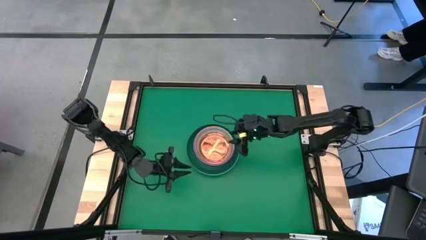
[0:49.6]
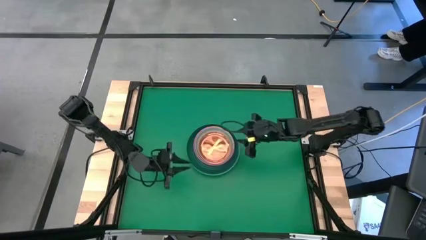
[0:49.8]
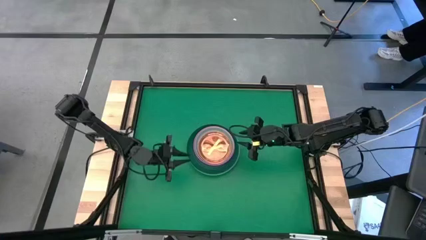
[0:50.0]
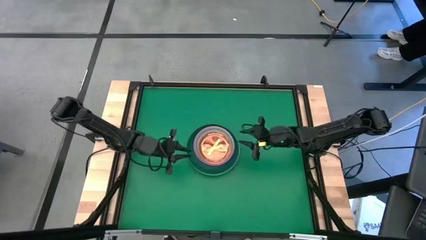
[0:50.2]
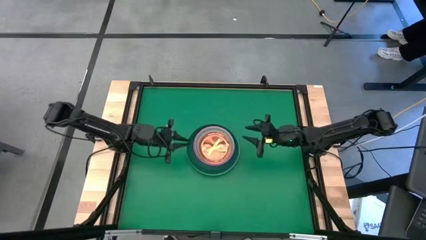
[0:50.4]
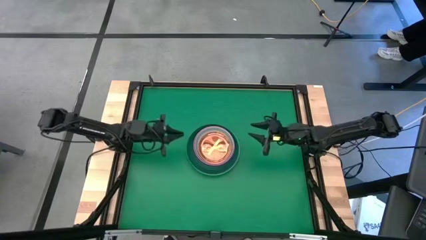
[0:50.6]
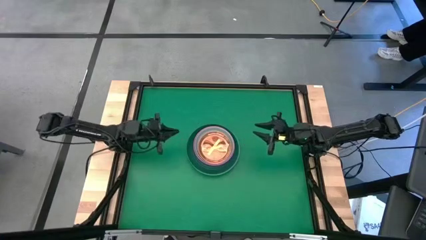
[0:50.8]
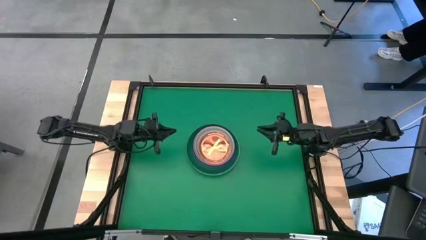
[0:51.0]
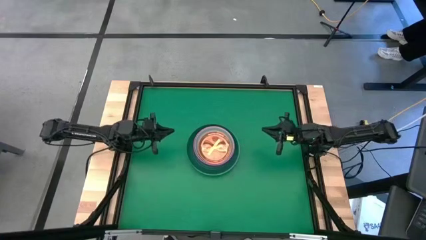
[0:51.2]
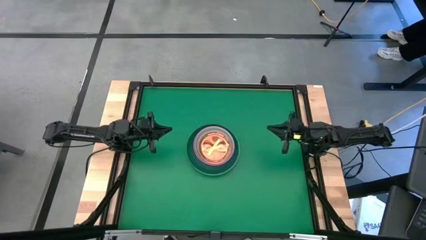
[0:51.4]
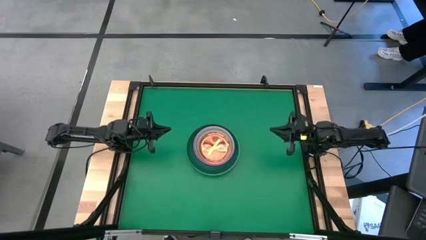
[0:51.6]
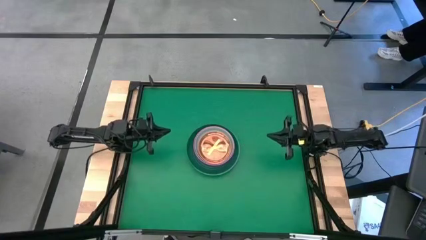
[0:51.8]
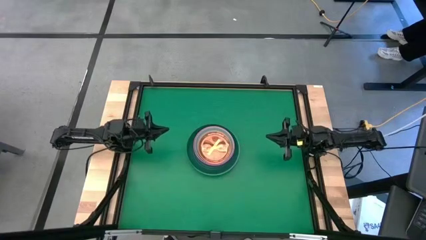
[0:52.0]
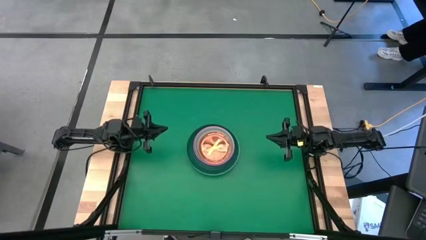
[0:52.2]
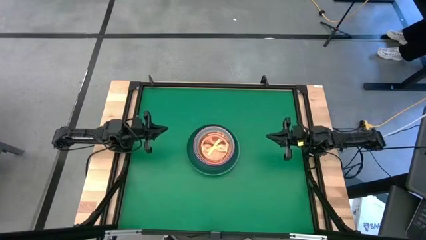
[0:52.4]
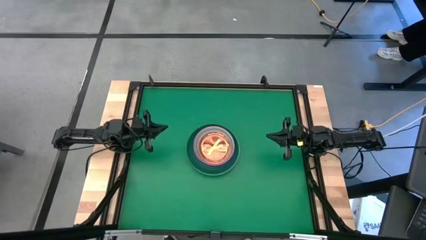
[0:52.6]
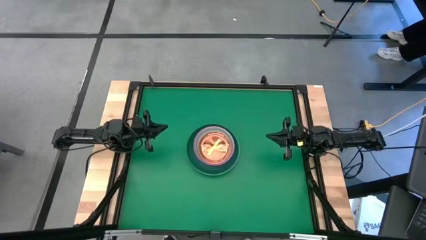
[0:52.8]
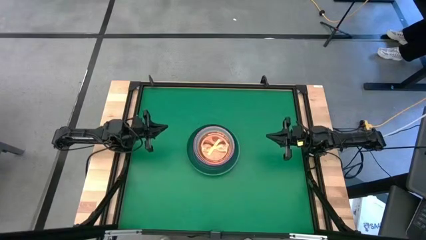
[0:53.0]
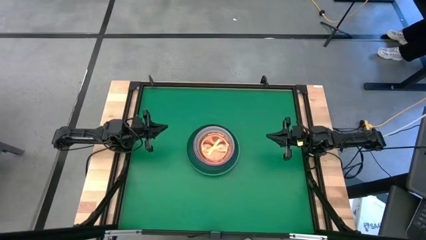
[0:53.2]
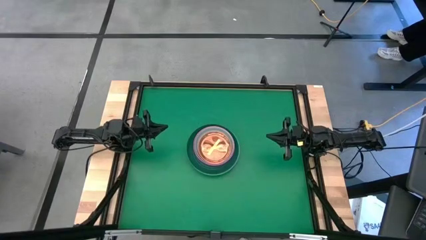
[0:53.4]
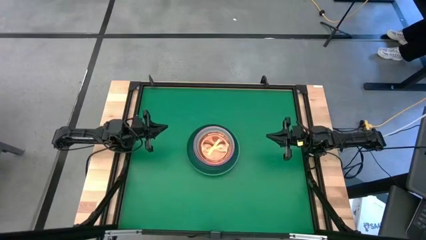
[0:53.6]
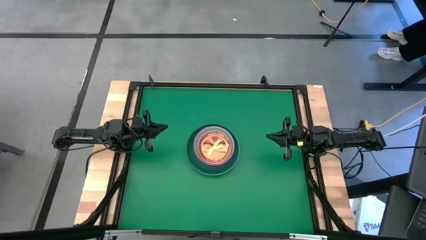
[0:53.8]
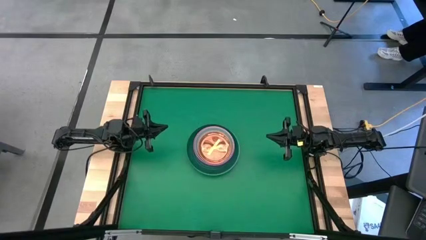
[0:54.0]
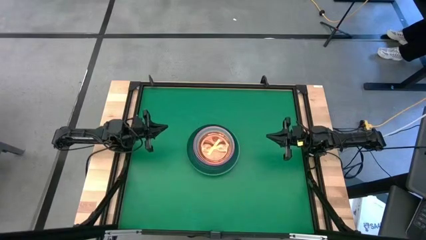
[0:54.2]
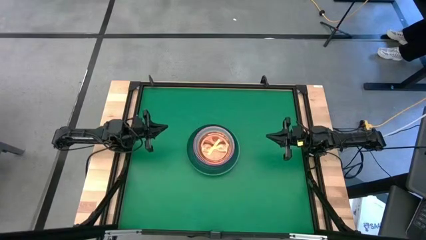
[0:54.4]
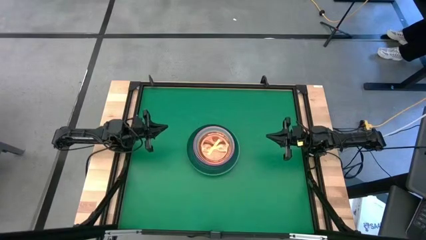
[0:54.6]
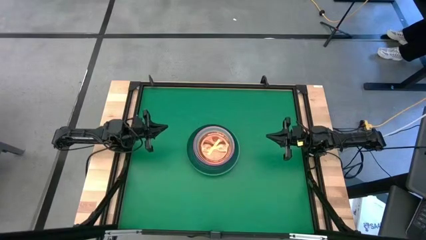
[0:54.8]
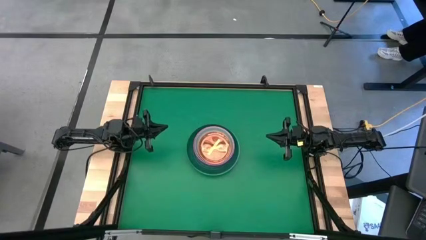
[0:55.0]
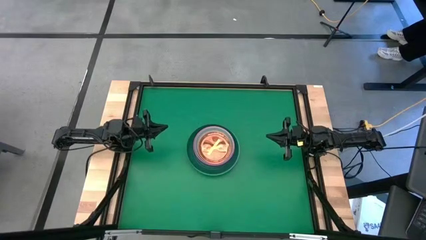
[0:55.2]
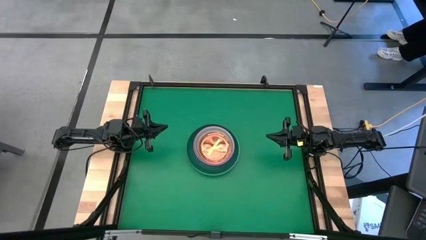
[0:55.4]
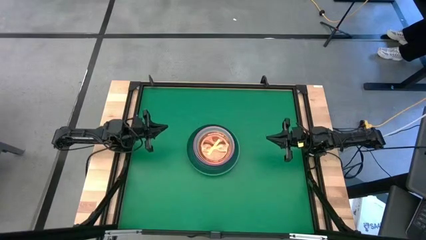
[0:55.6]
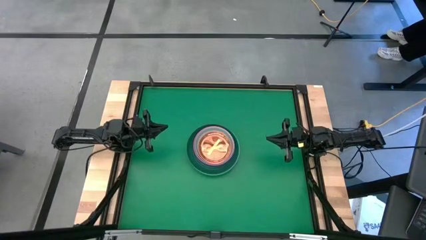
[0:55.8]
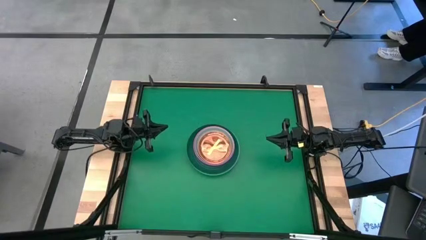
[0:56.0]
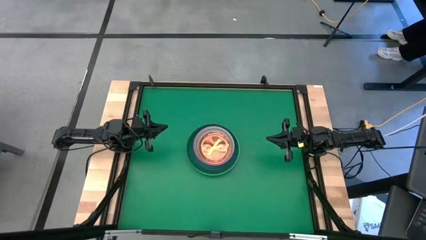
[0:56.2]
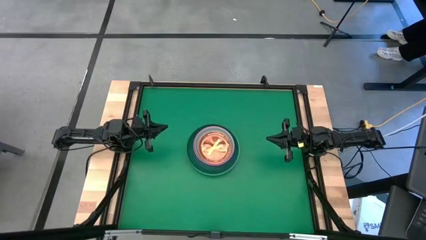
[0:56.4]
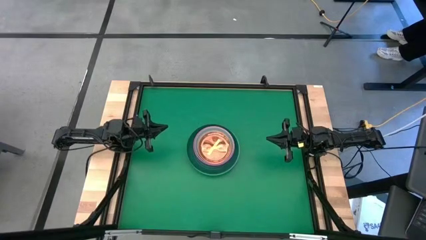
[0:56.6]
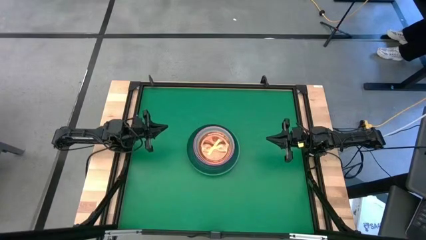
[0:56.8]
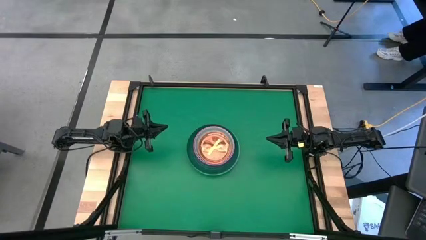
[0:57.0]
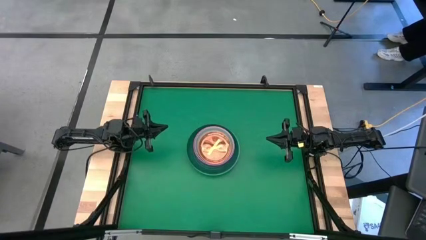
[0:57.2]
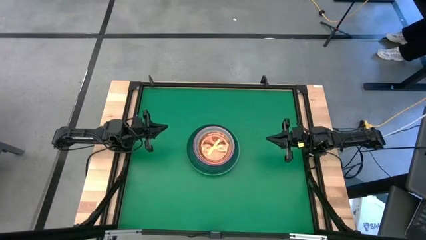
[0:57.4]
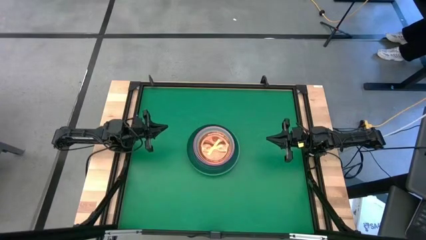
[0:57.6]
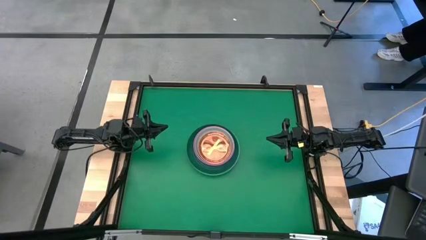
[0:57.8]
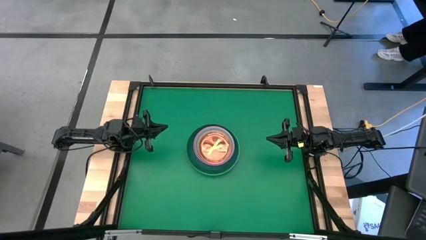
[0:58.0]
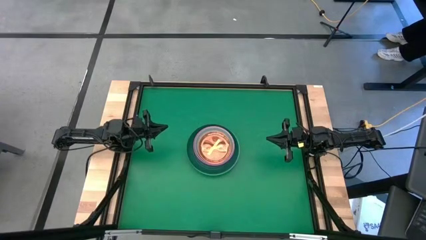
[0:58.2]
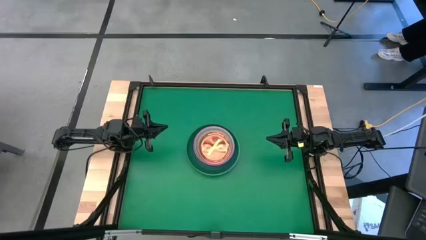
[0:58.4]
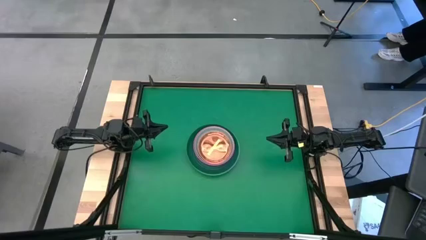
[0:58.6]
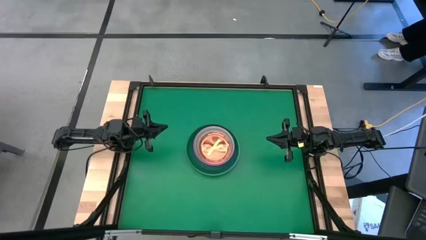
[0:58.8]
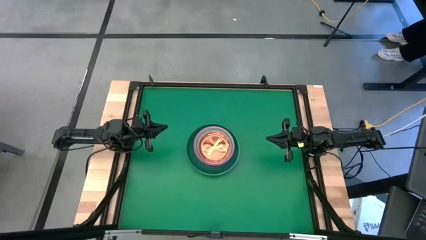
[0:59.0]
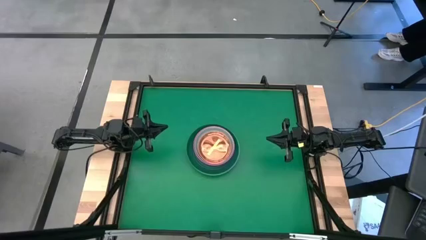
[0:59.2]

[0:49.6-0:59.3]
Task: Stack plastic plates
Return to Home Position

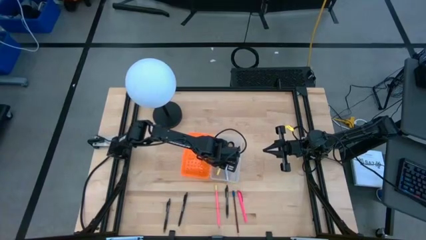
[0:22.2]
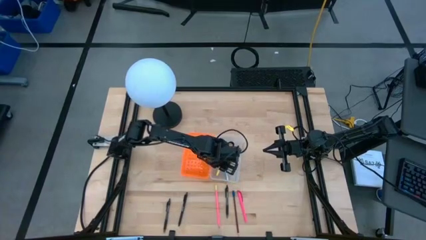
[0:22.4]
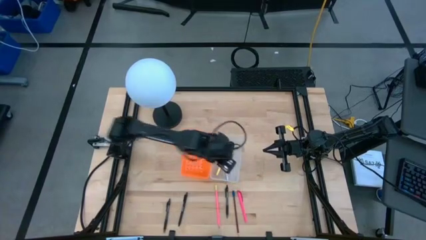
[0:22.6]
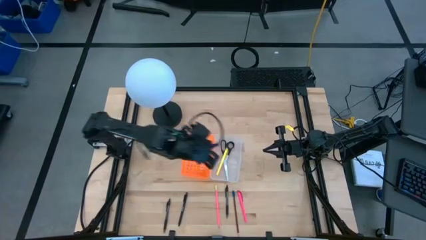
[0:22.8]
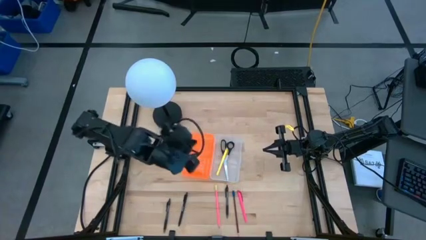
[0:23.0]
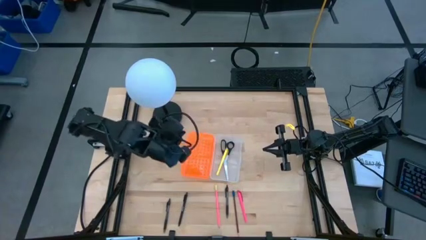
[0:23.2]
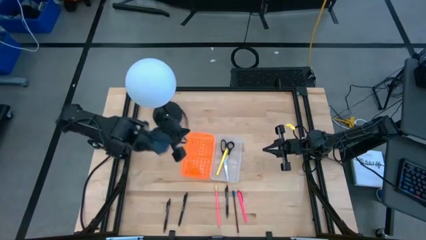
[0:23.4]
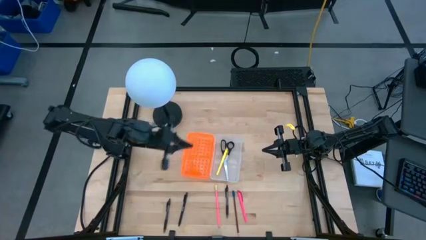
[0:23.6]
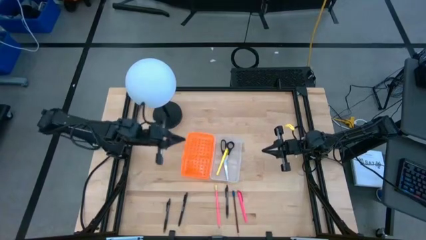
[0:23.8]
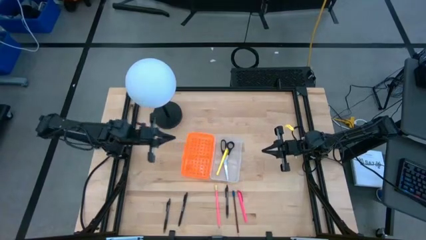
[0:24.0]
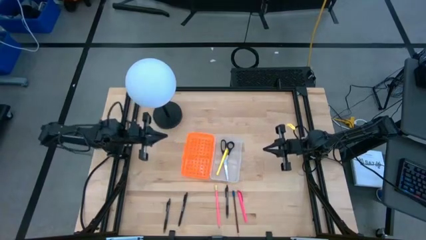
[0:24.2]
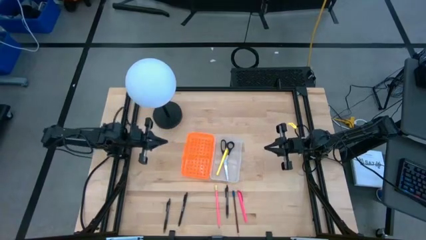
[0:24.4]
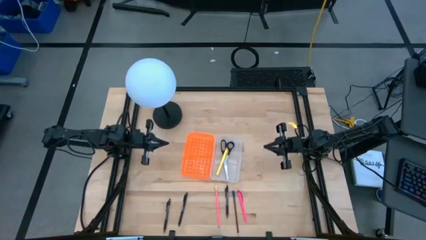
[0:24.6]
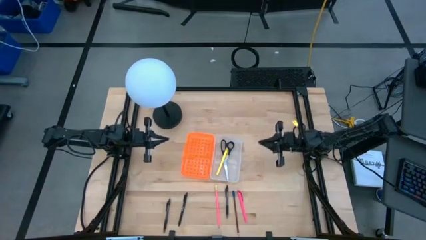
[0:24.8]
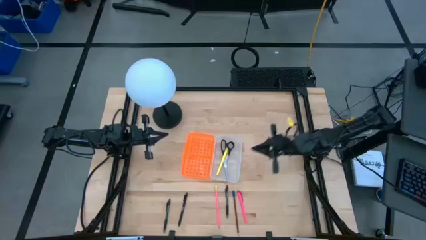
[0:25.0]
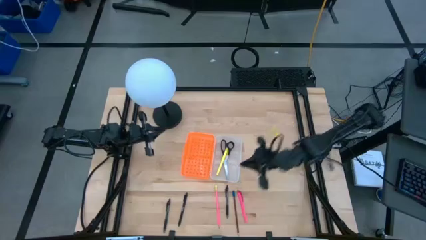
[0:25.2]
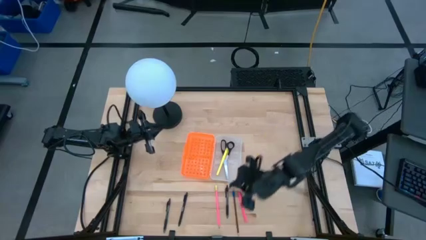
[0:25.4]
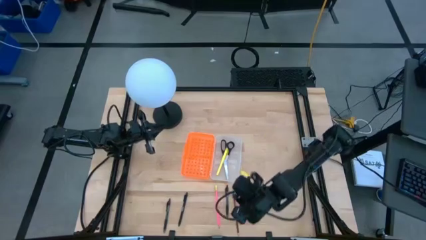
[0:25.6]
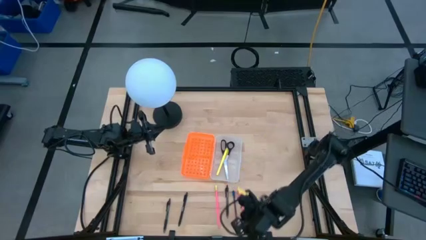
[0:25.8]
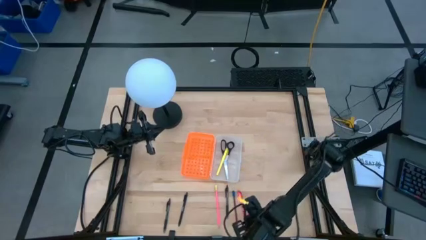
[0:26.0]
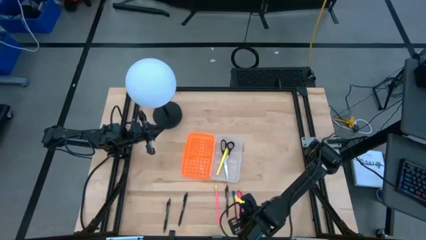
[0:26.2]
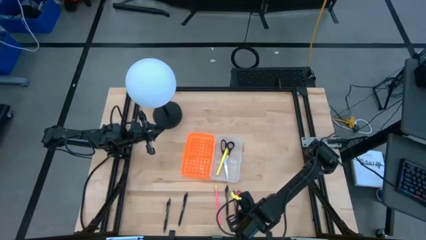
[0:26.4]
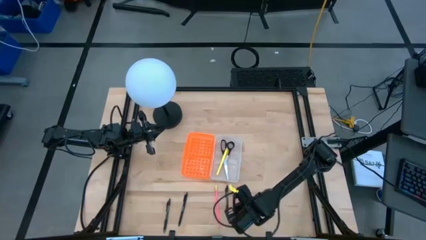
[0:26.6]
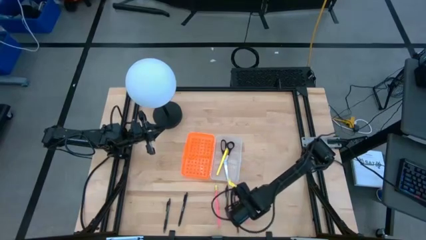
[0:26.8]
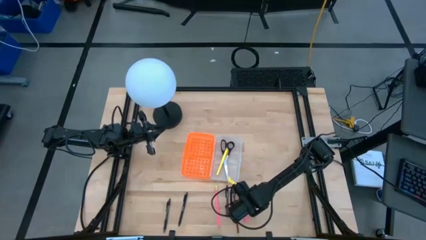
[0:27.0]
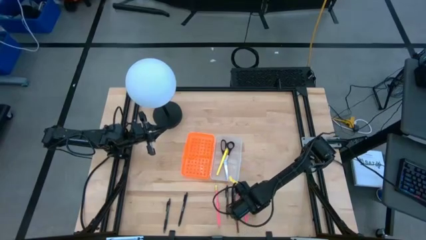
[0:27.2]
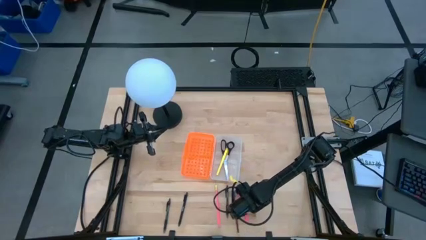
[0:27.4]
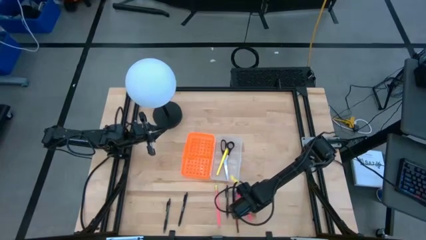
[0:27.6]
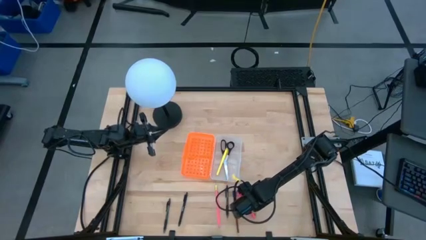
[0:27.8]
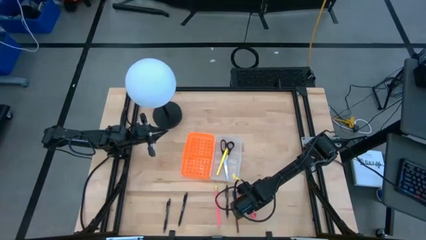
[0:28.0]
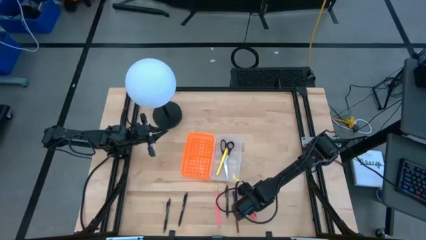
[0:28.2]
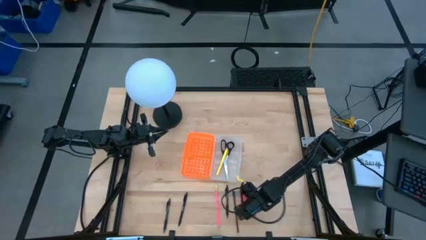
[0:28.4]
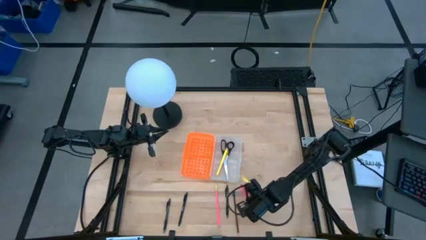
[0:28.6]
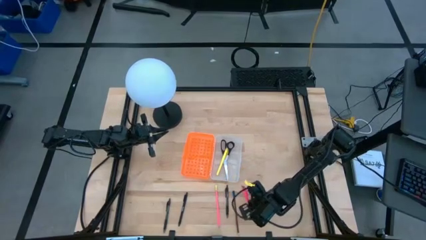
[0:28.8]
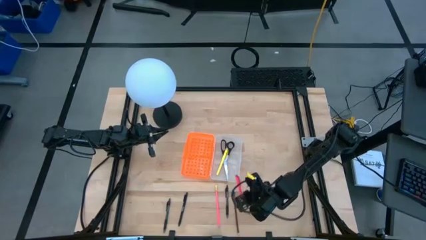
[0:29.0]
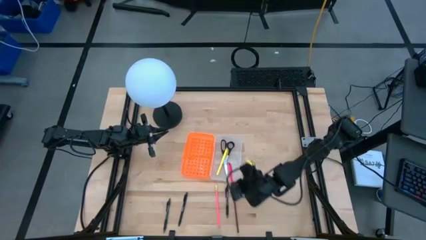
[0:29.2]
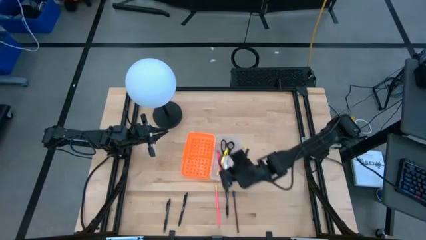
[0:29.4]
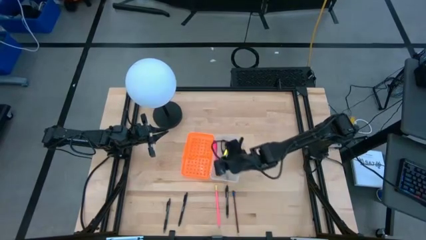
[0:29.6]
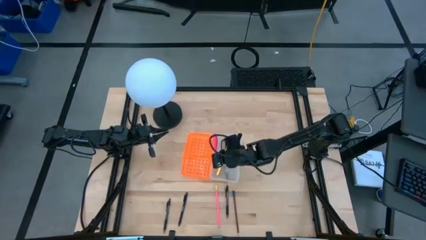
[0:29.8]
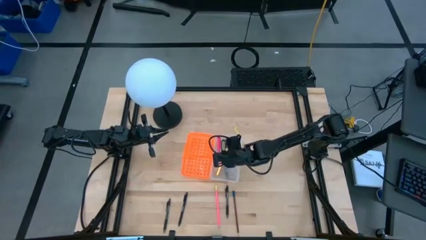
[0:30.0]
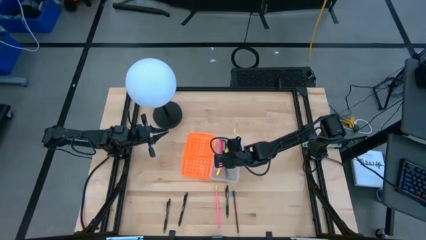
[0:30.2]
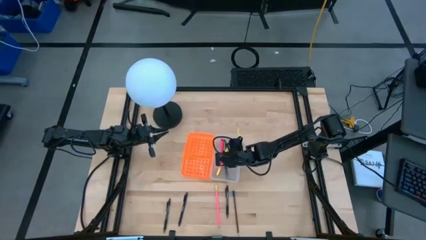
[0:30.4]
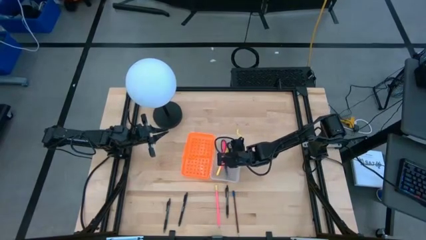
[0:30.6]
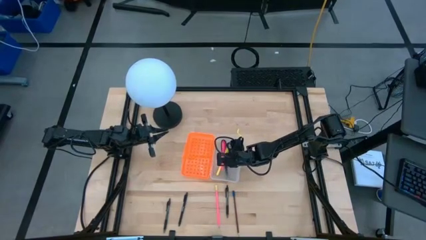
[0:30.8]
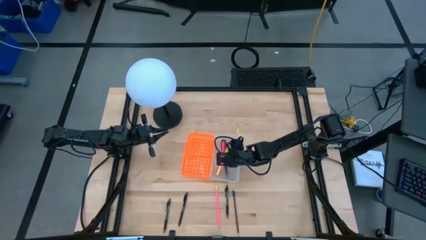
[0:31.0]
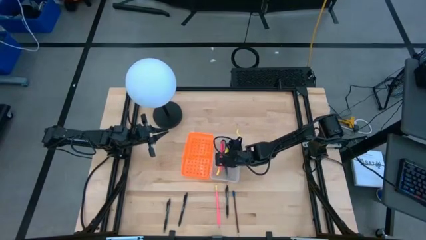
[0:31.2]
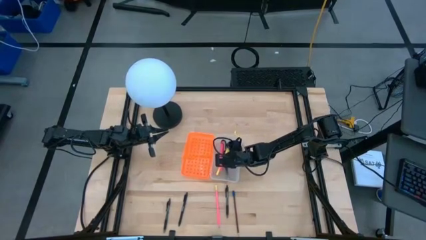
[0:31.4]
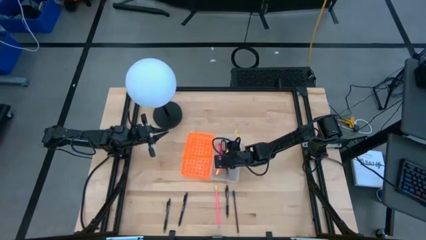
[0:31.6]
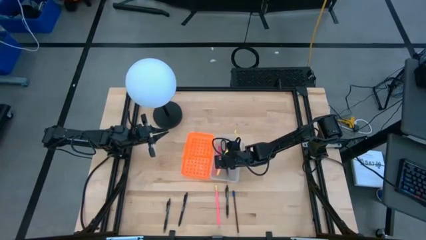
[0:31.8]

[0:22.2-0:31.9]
Task: Pick & place school supplies into a supply box
Put the pink pen into the orange supply box
